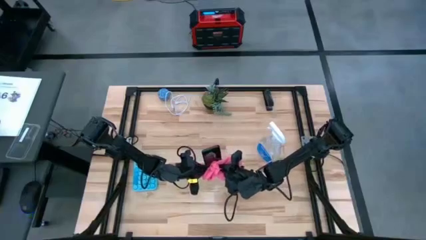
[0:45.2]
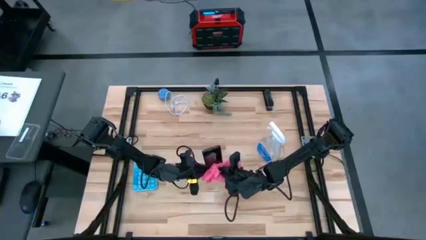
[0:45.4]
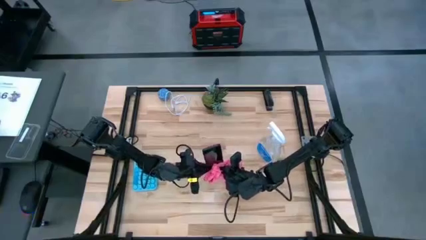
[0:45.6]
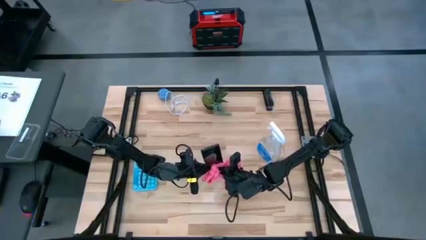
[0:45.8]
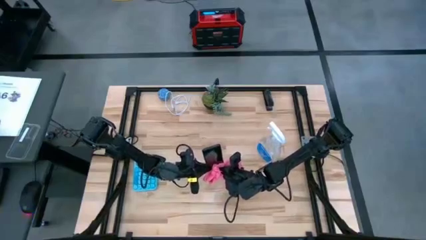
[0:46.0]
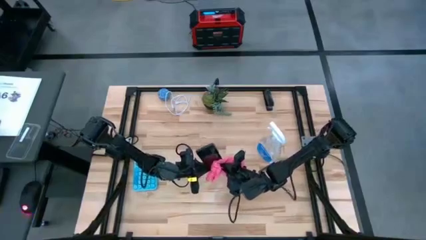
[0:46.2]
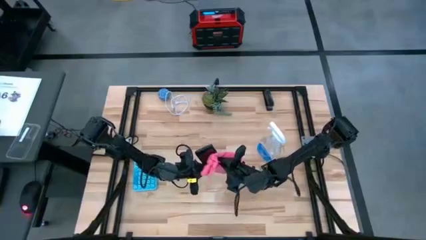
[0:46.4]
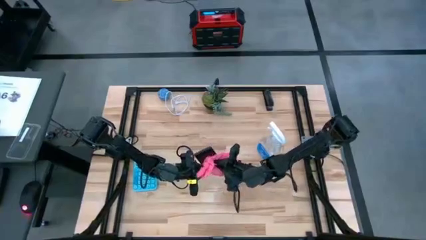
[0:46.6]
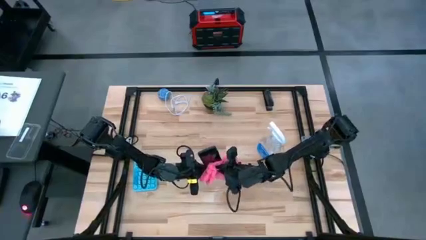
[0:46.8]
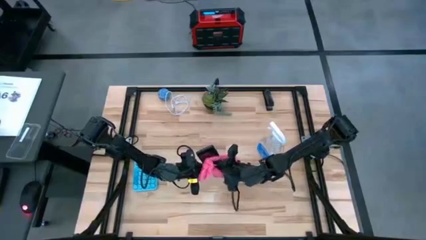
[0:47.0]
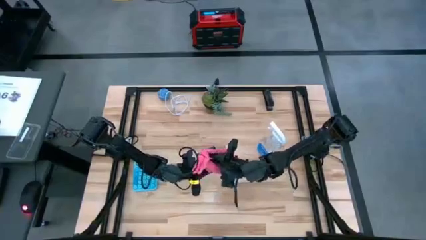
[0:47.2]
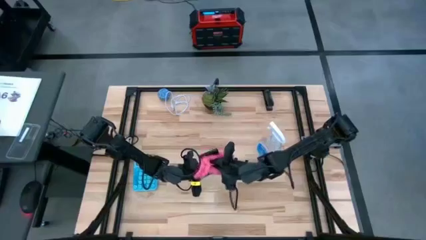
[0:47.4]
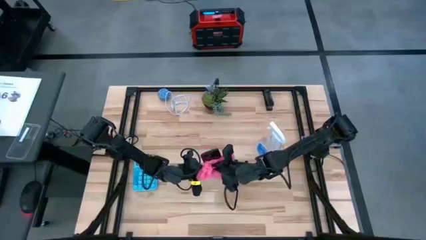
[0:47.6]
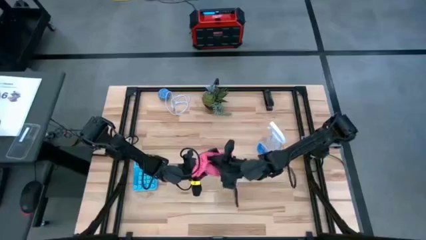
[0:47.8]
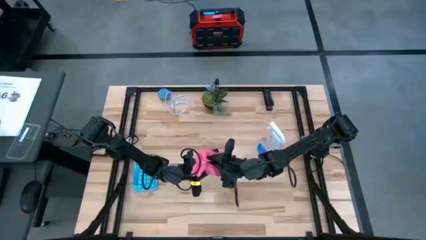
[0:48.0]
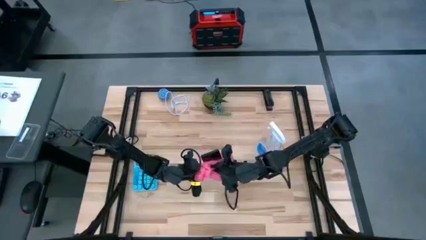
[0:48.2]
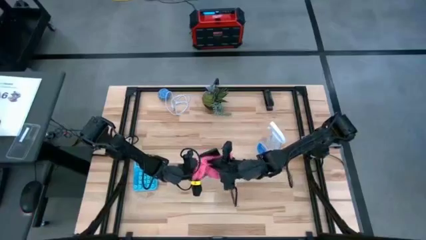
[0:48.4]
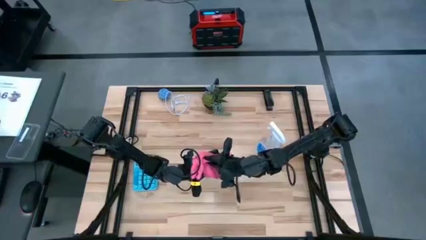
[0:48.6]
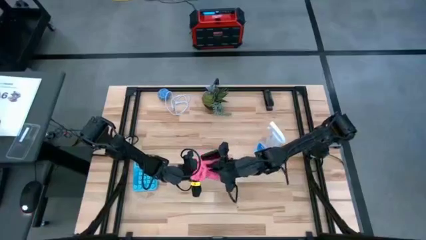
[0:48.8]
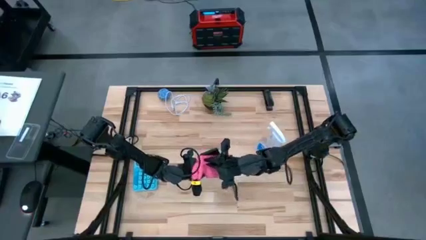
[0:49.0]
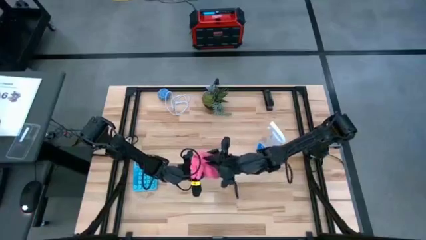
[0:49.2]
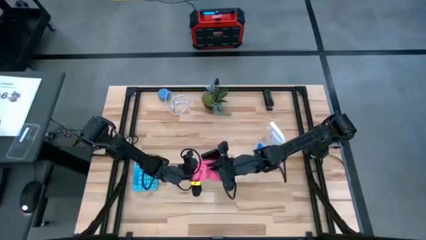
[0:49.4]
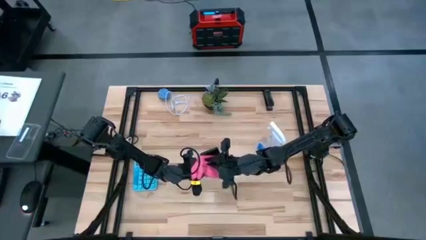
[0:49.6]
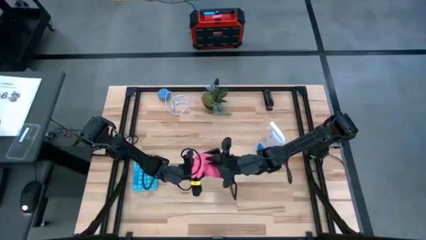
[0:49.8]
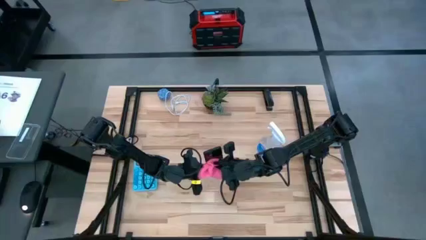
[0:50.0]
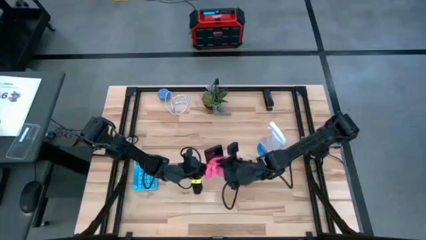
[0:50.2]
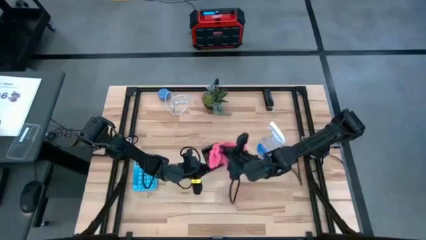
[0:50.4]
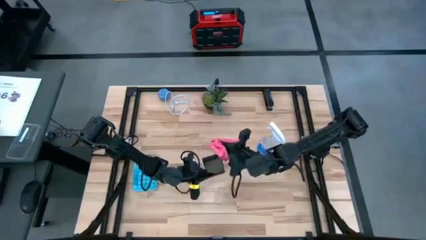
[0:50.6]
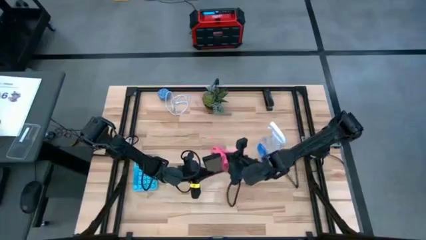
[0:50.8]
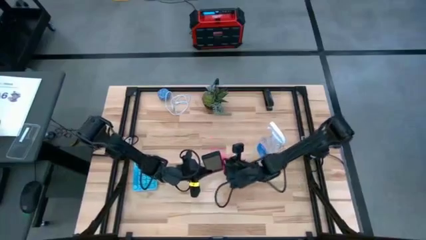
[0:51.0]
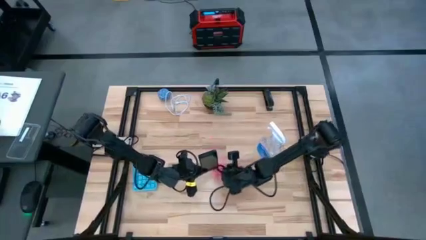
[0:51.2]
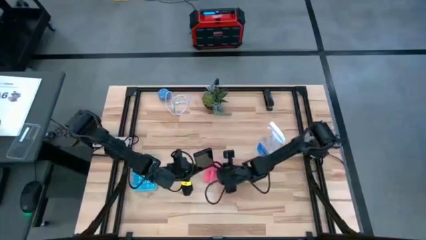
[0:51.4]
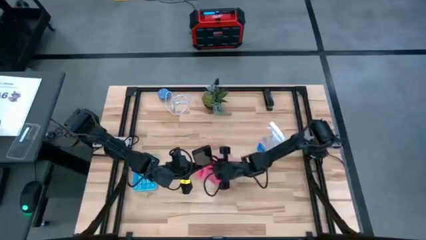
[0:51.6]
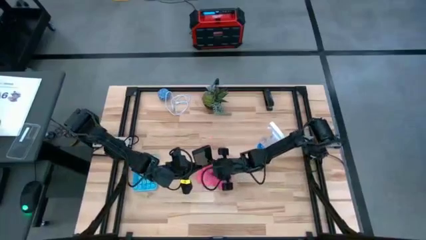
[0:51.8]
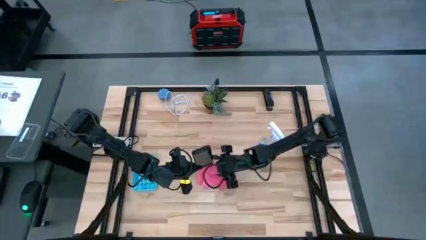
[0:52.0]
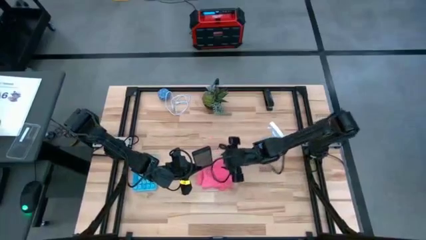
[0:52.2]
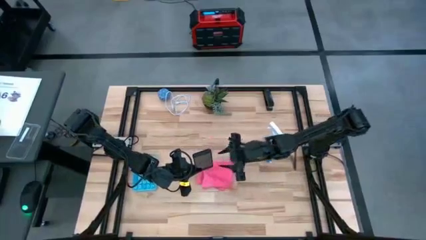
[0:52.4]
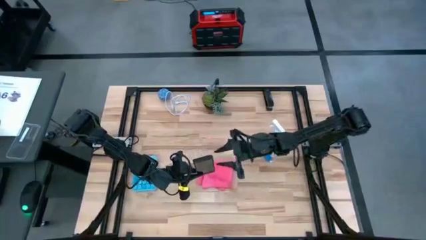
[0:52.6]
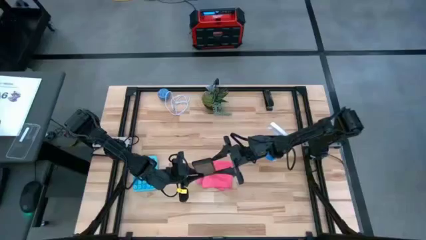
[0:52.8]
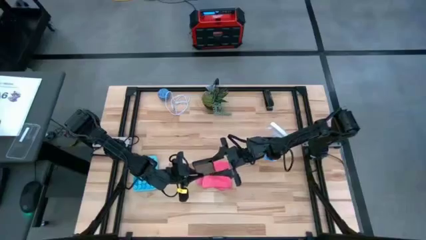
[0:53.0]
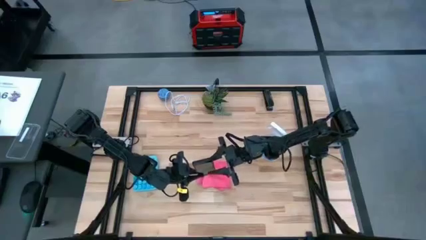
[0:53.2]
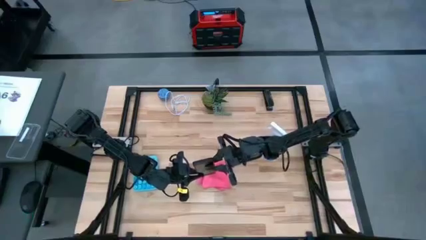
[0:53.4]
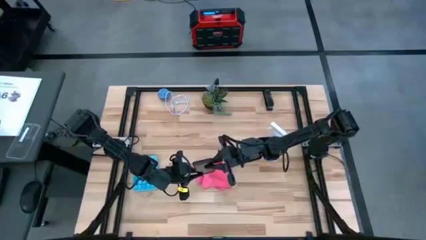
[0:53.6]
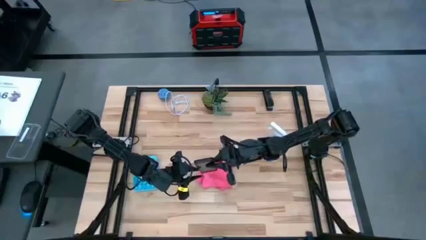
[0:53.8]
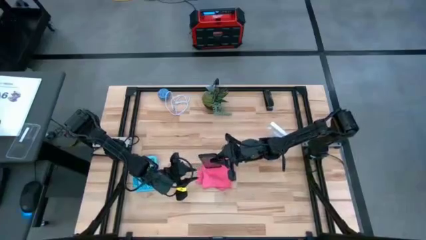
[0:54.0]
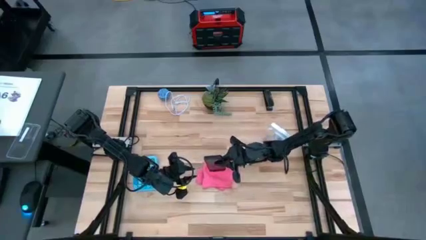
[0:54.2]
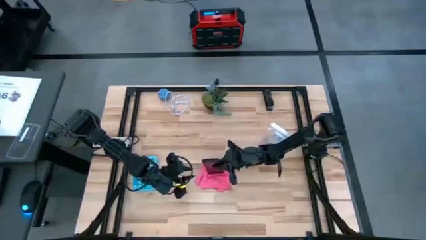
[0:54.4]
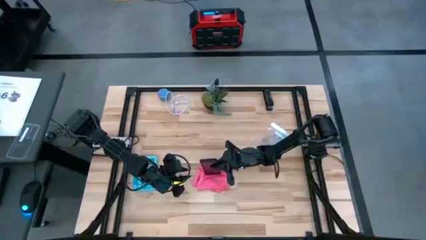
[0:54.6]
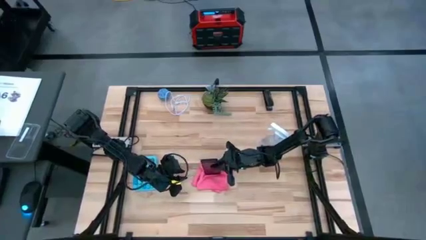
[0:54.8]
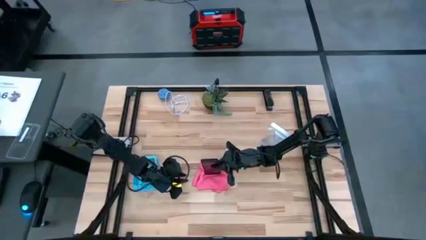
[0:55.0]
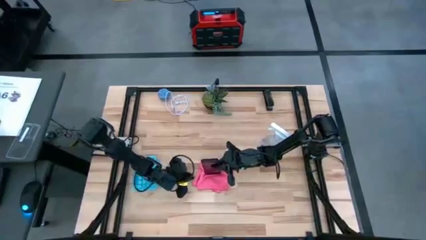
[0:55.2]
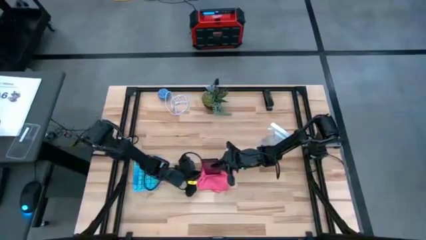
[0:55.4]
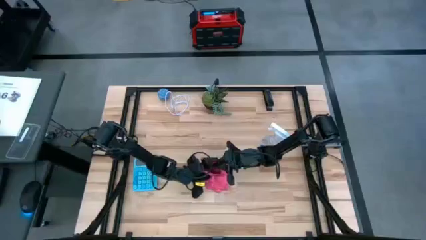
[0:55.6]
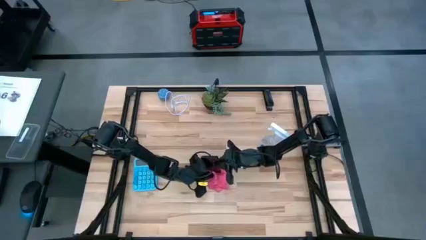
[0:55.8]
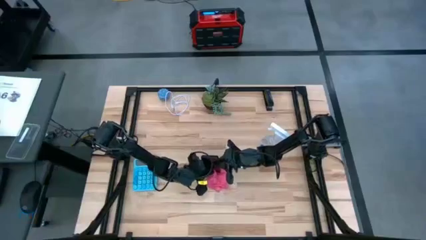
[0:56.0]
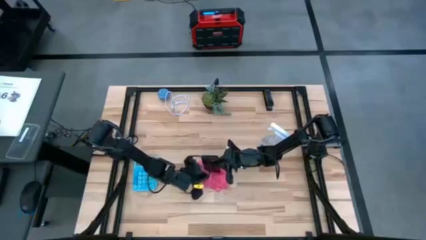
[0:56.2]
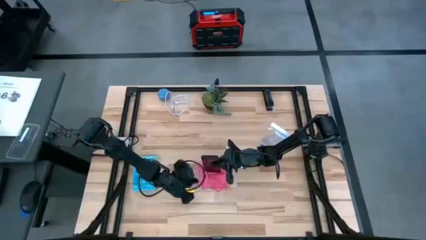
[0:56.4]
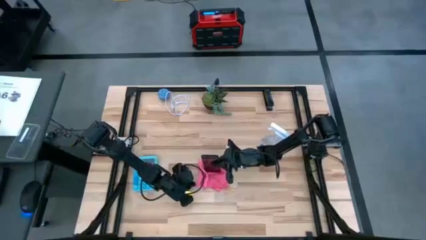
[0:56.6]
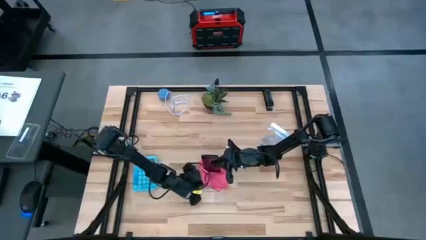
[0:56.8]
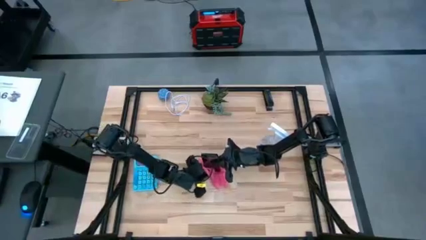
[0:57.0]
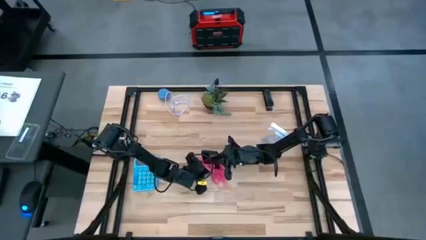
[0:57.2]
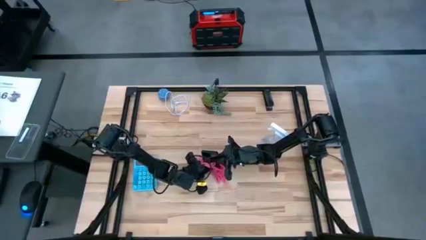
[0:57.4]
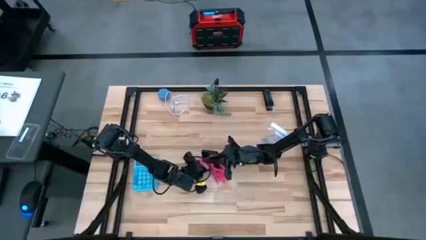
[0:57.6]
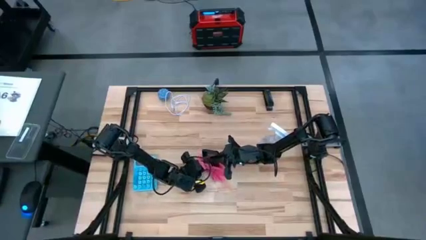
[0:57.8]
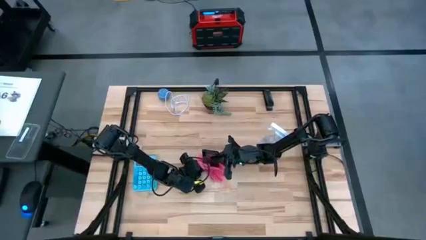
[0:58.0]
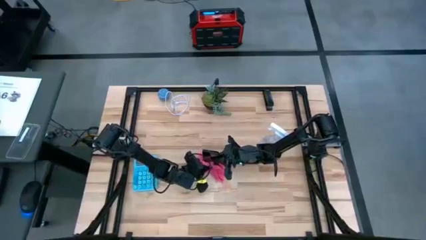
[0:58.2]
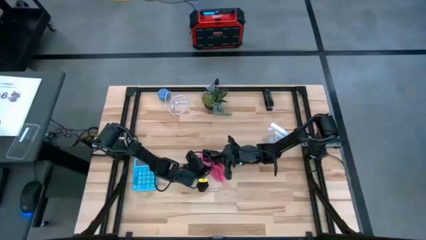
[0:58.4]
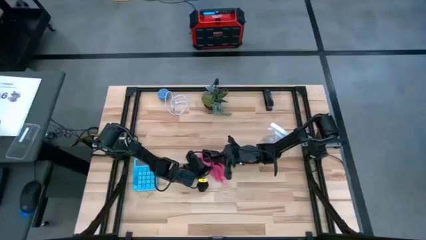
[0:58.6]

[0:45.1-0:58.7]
Task: Apply microfiber cloth
Wipe the front of the cellphone with a microfiber cloth

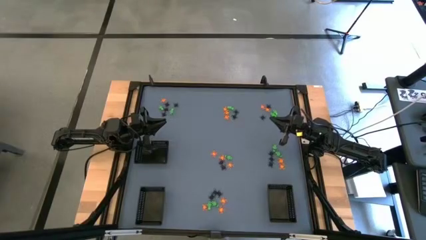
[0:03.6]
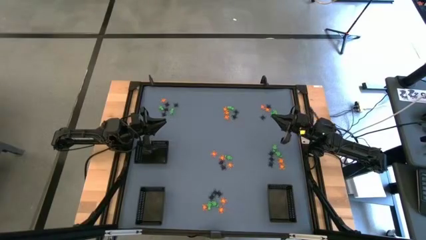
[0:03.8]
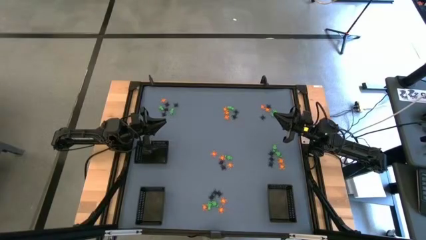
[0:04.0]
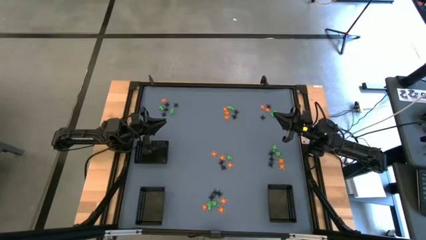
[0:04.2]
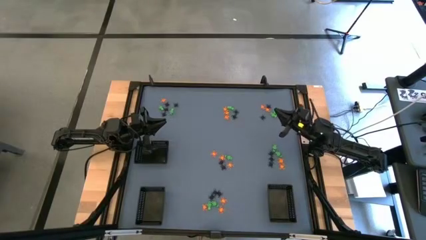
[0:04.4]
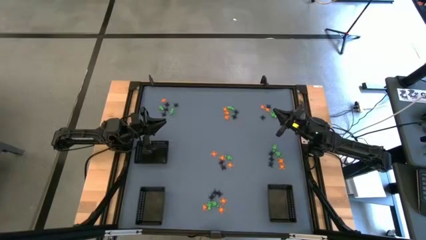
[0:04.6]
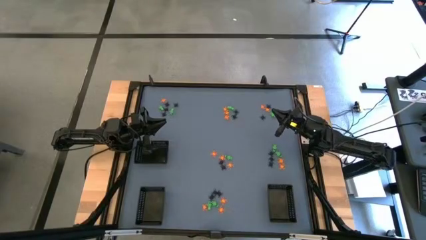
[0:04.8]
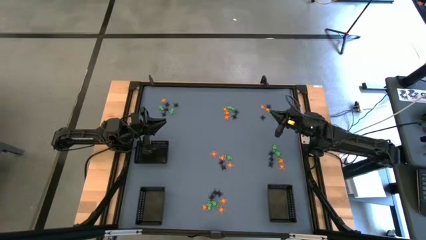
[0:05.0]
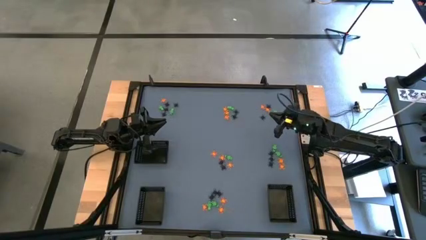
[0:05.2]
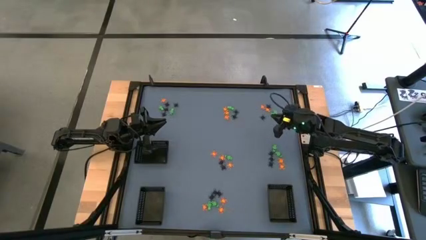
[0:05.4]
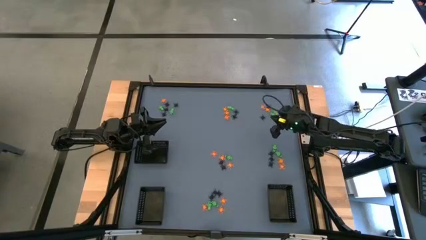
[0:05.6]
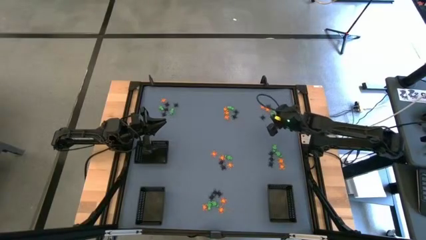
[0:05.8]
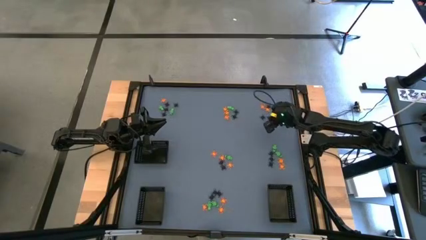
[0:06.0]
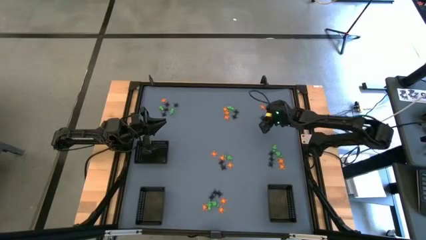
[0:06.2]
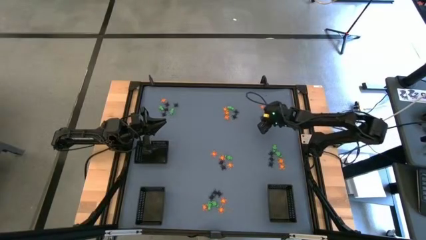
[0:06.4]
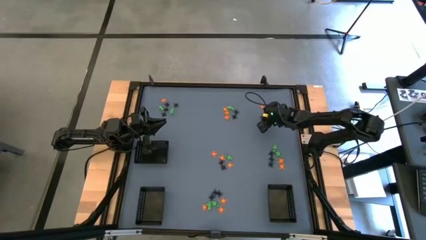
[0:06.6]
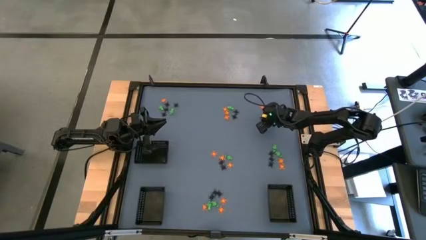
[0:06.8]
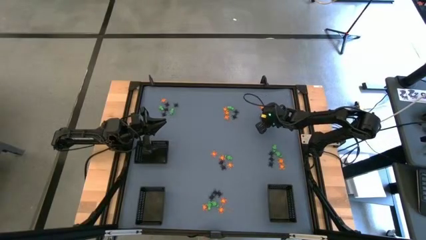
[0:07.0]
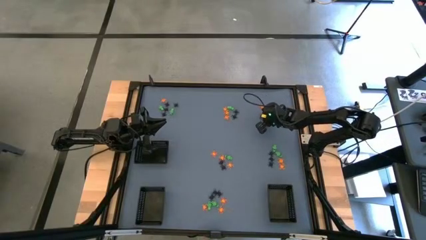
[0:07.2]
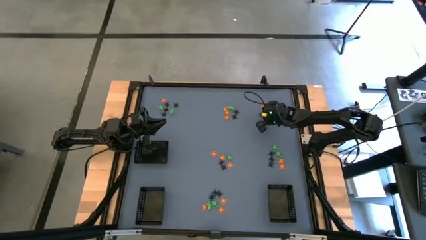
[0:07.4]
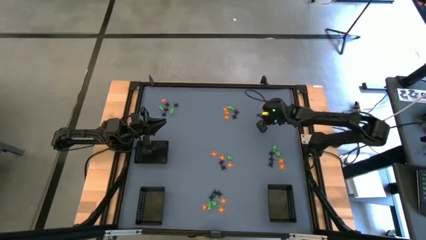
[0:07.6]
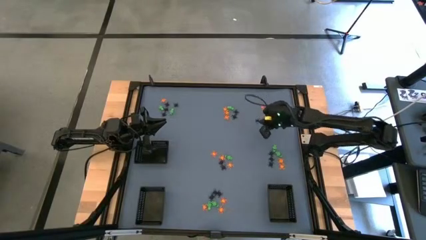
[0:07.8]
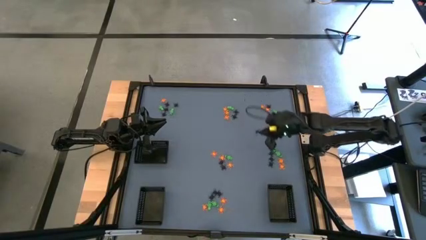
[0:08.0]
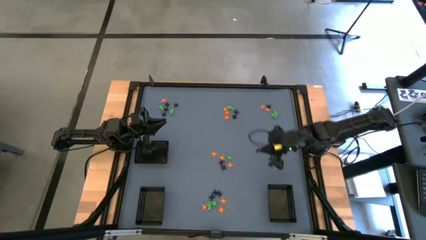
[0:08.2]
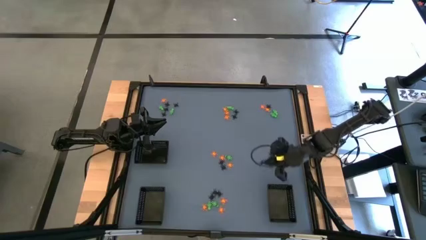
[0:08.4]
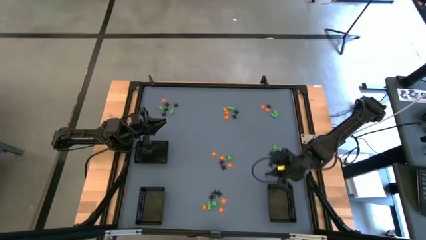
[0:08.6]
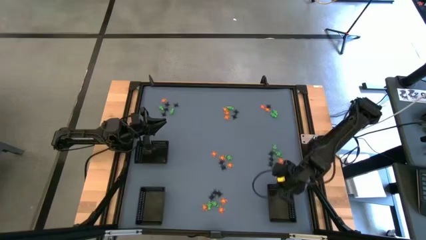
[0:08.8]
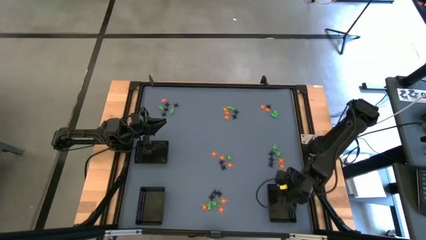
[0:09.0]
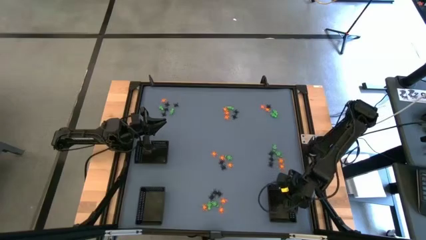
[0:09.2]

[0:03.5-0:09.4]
Task: Sort Halloween decoration
Put the black spider toy into the bottom right black bin
